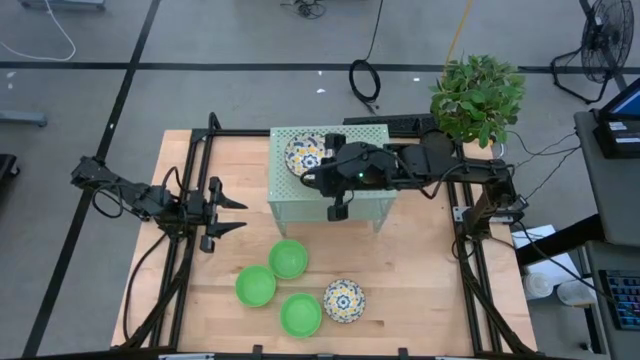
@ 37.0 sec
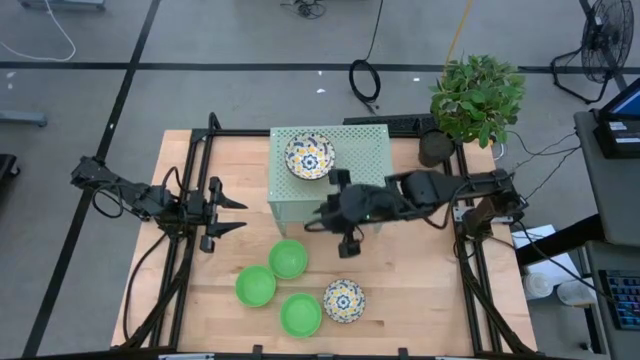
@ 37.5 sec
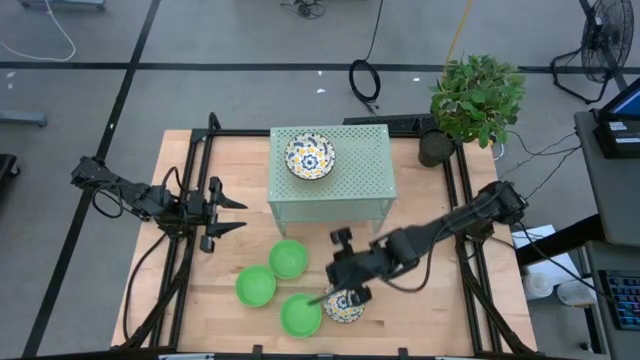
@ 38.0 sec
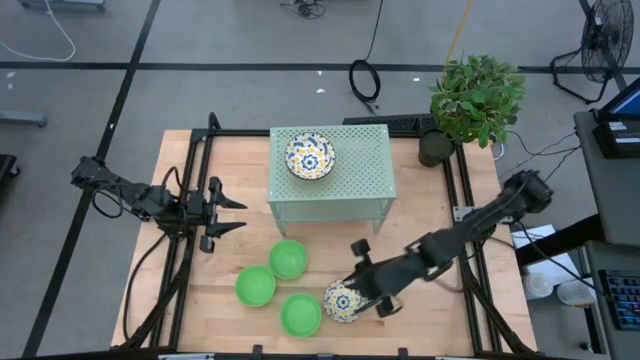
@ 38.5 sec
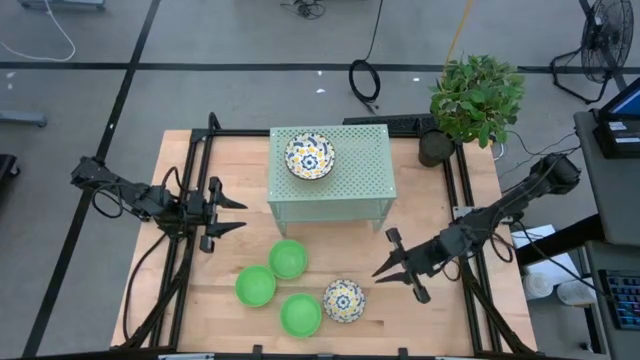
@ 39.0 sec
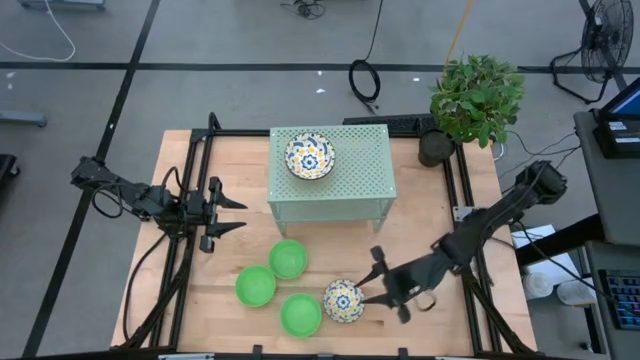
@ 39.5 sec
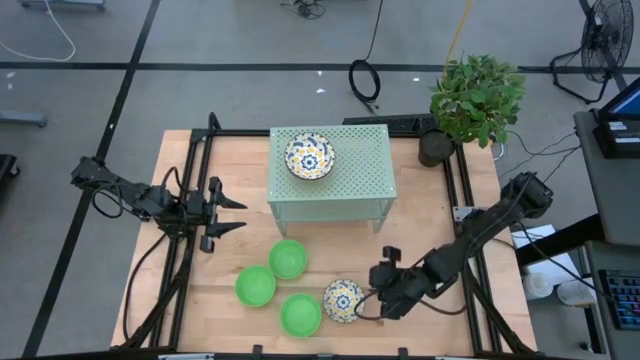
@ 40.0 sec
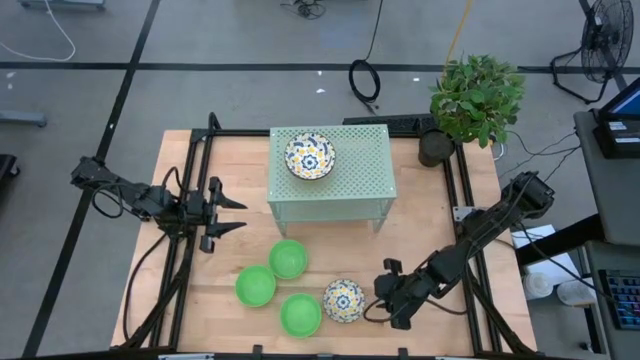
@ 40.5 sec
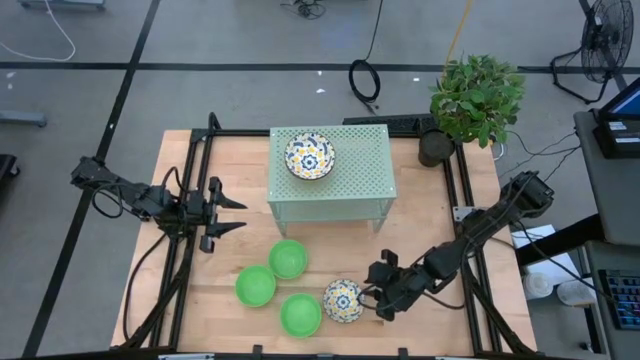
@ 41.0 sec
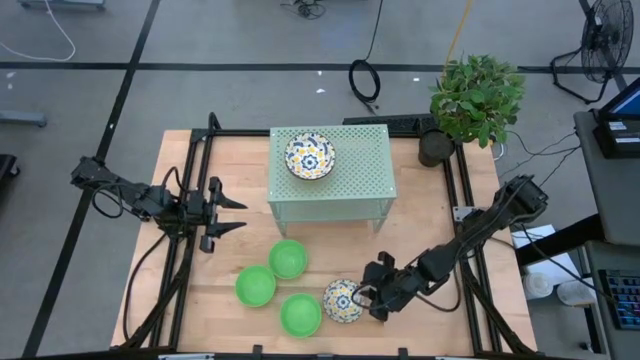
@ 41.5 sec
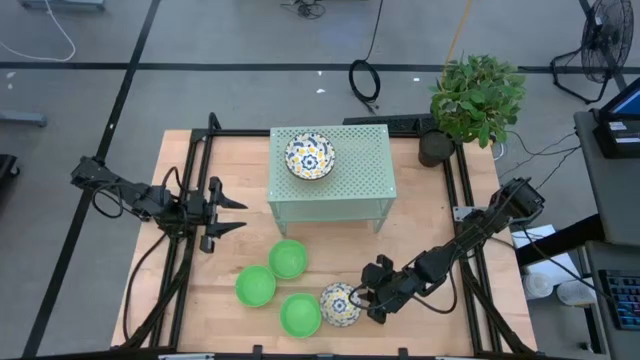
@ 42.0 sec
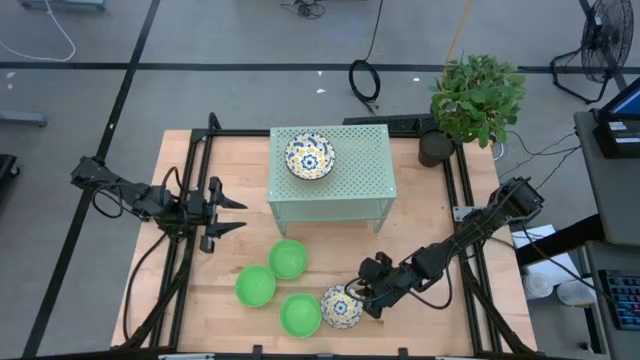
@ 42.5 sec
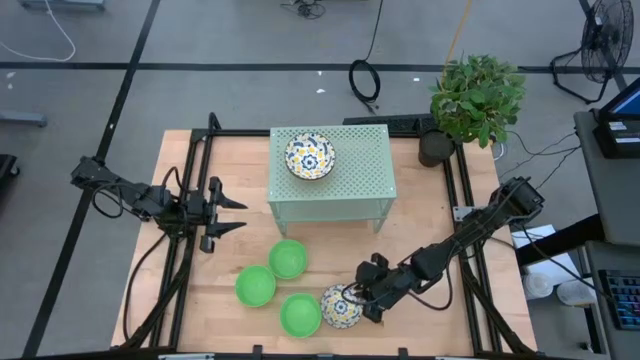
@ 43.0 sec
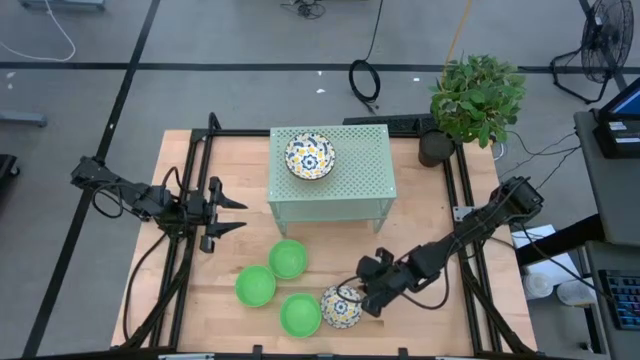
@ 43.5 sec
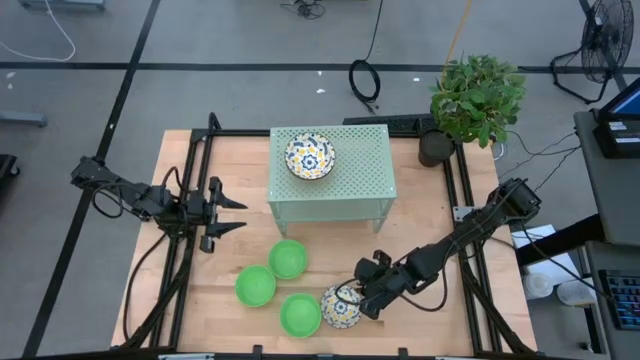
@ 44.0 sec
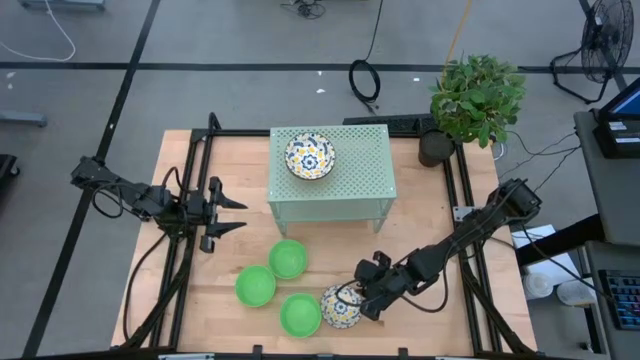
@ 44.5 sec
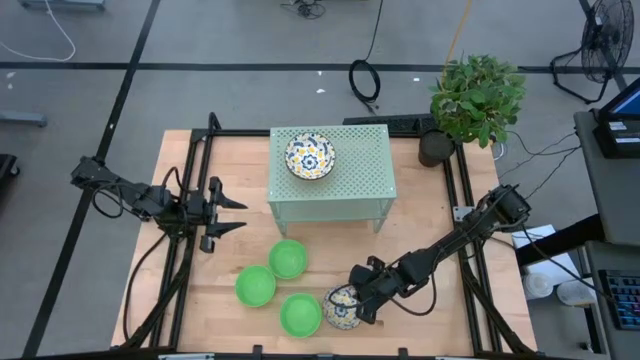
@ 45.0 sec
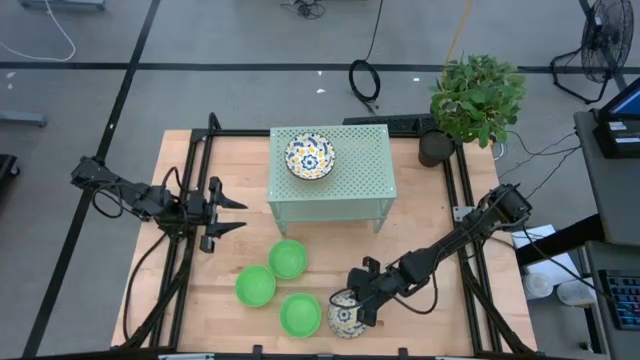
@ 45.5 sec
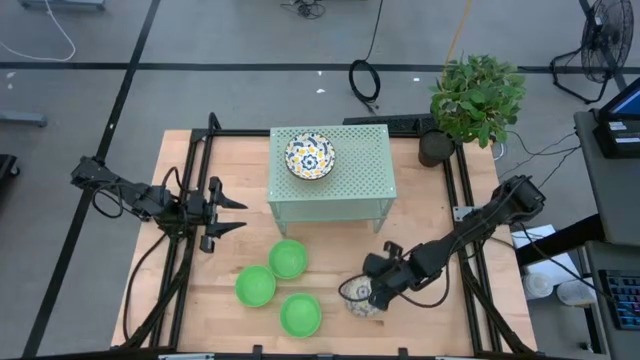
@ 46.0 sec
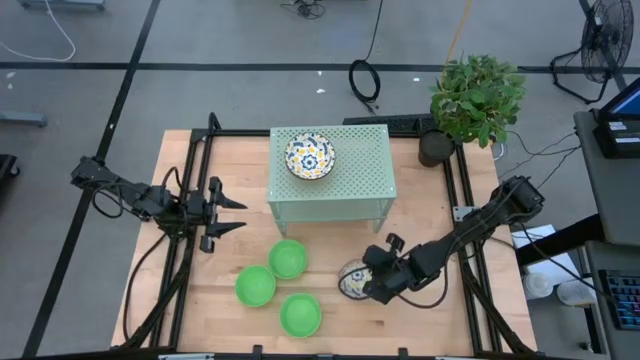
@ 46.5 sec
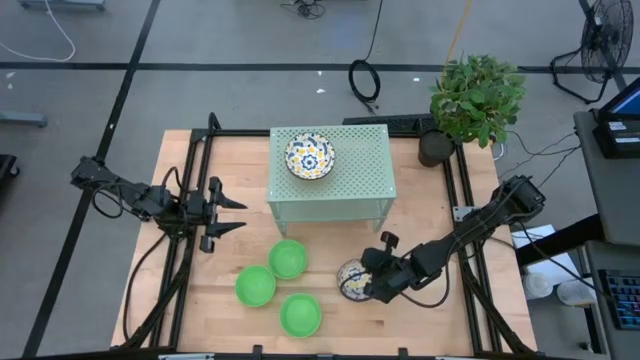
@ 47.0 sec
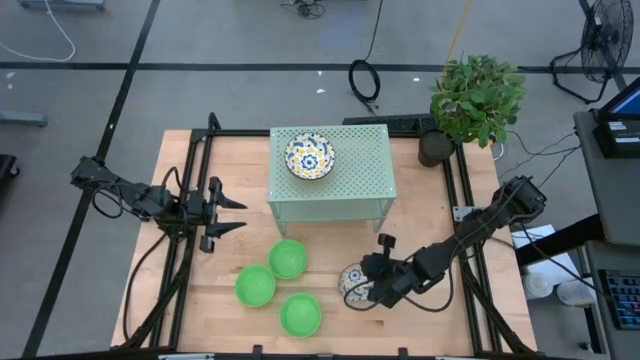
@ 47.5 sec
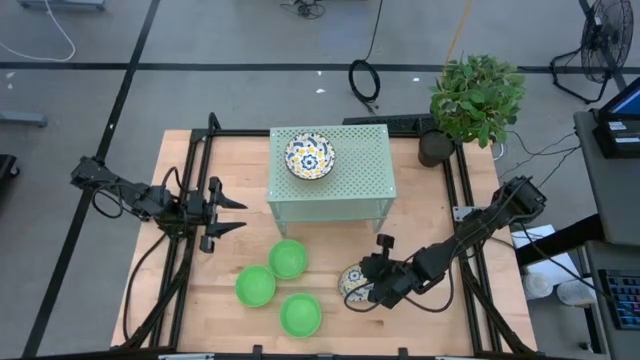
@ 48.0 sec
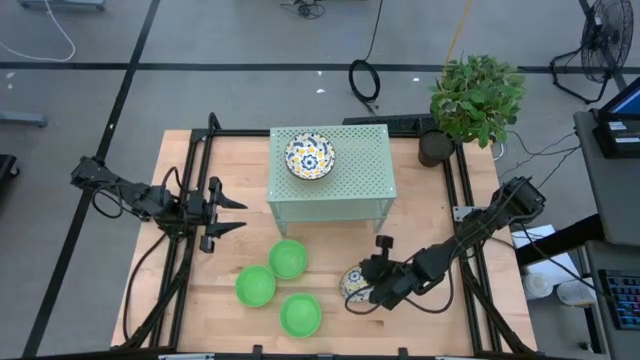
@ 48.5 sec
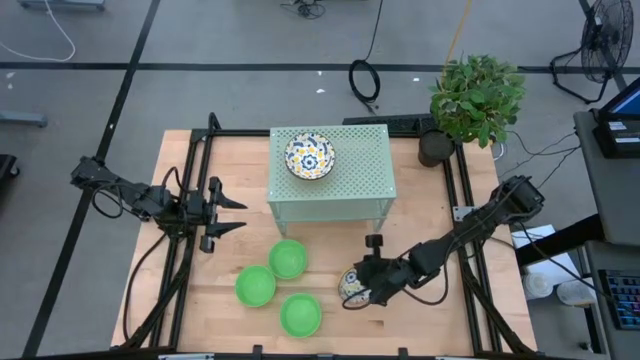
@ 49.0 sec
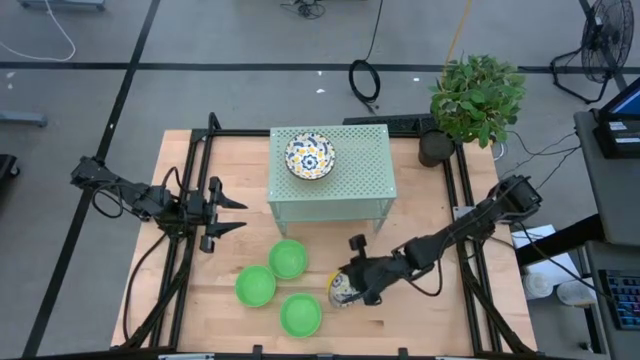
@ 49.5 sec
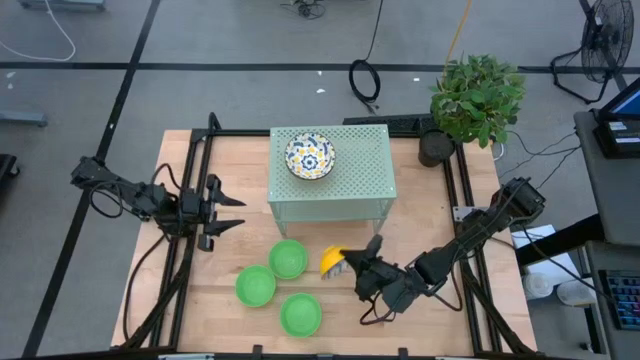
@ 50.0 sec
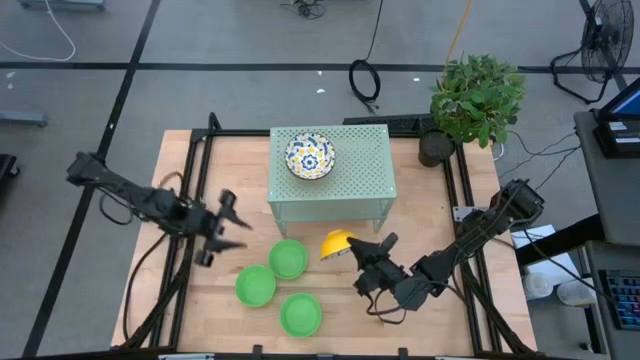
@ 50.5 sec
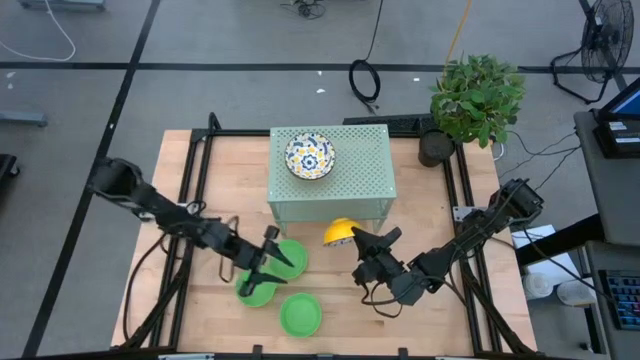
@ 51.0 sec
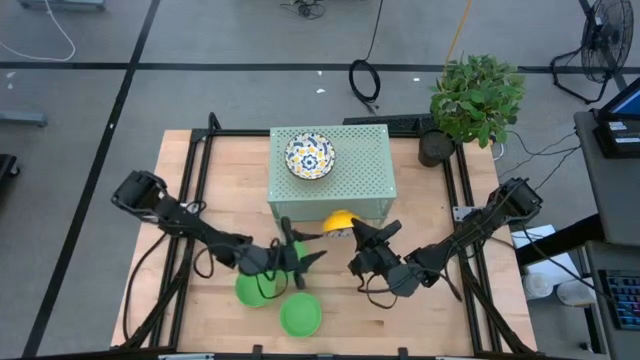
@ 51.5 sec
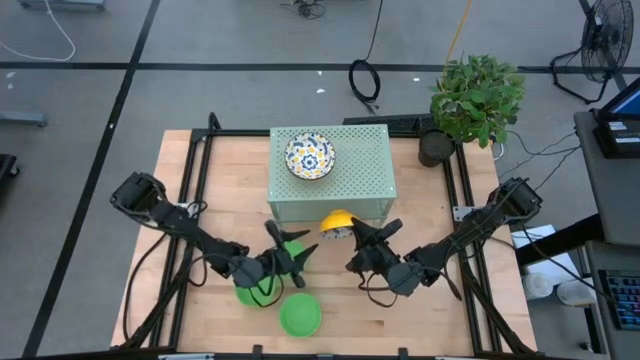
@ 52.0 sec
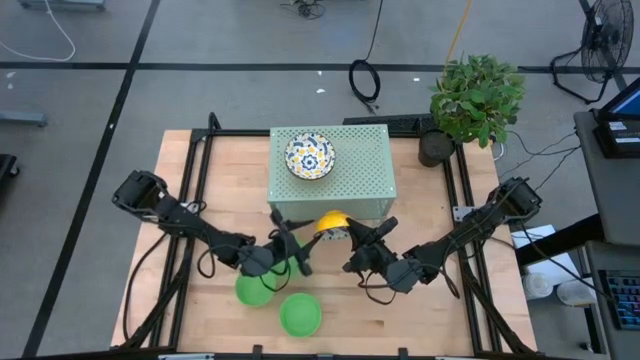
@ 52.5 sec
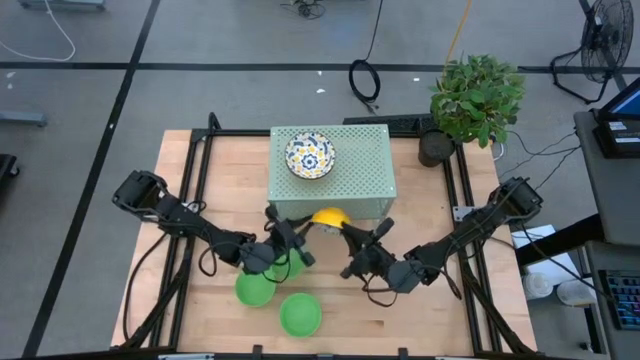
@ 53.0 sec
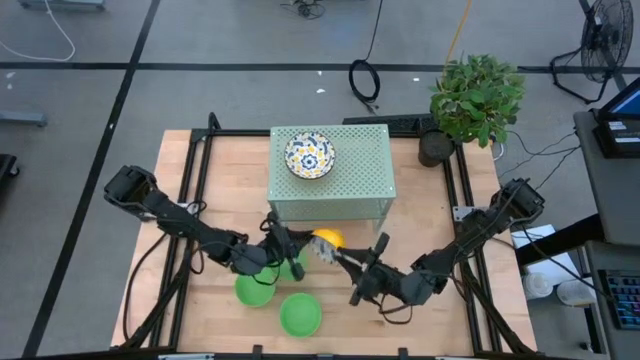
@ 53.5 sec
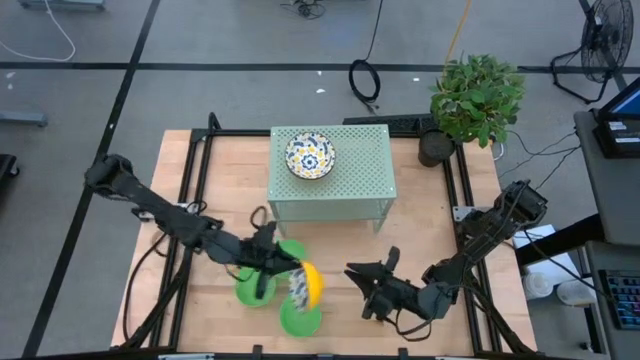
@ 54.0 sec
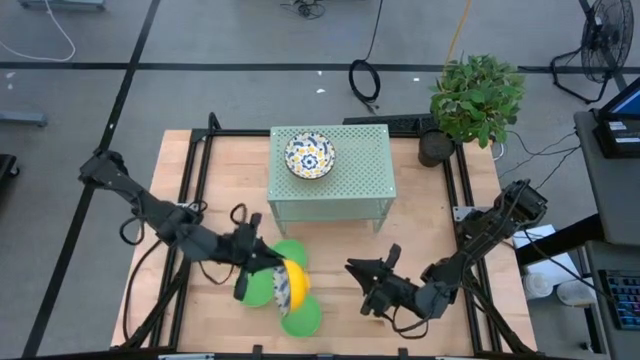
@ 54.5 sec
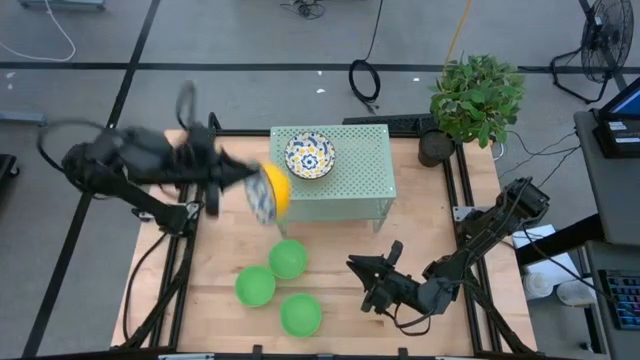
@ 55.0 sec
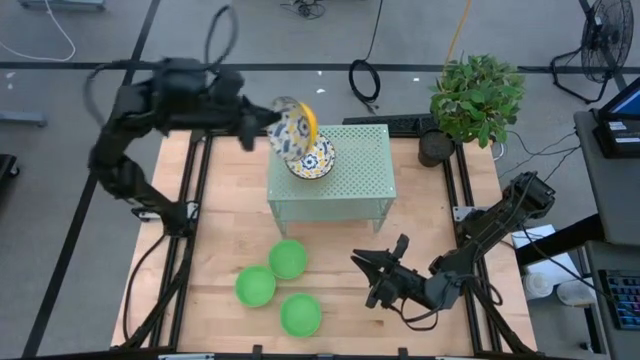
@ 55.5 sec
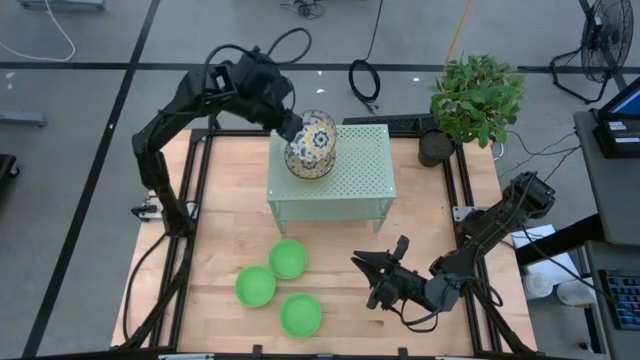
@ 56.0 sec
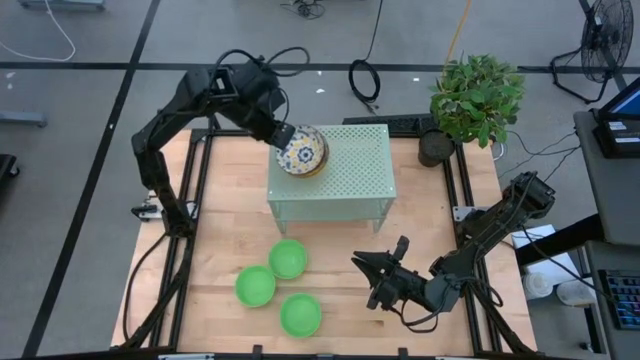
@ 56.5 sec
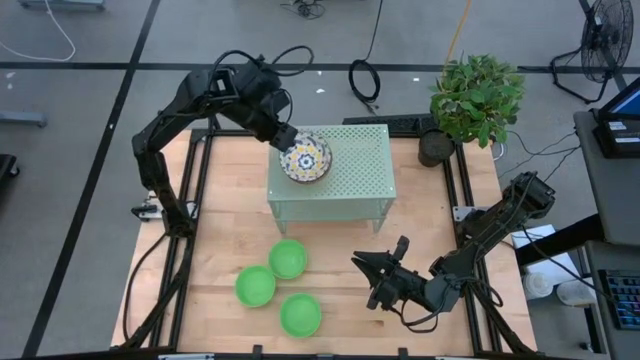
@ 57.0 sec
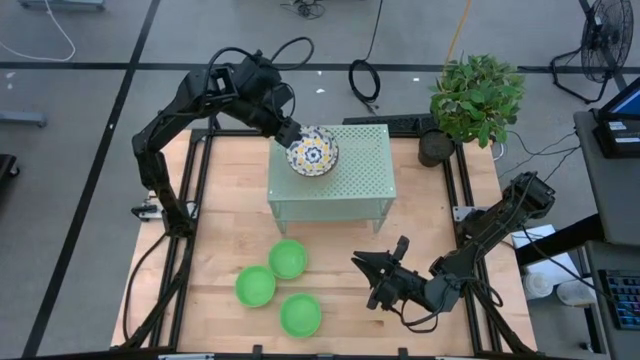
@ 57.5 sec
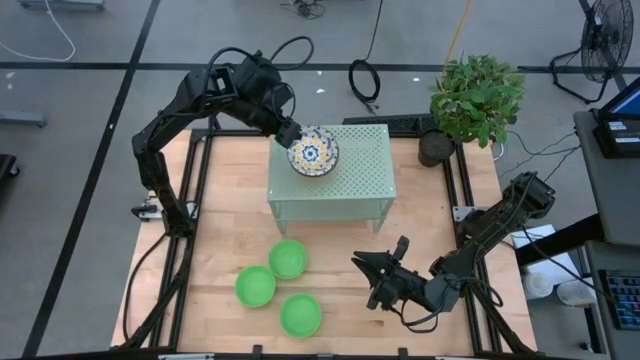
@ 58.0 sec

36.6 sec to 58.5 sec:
Task: Pick & Place Mini bowls
Stack the yellow patterned bowl on the yellow patterned bowl on the shelf
